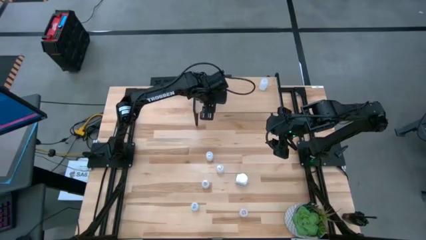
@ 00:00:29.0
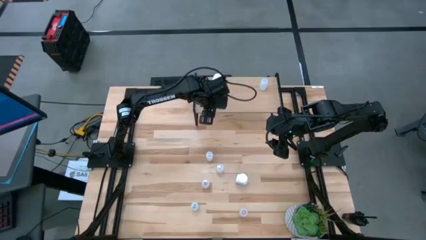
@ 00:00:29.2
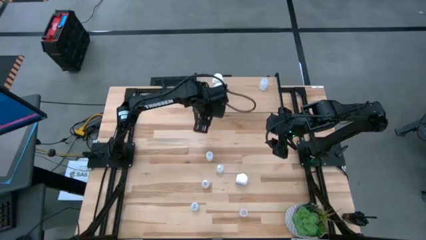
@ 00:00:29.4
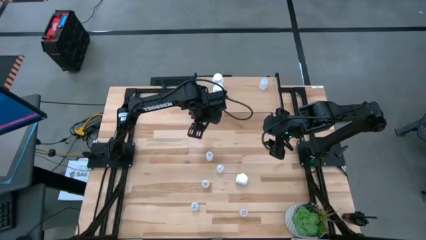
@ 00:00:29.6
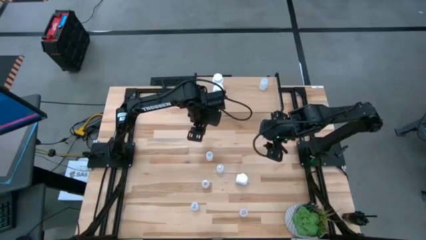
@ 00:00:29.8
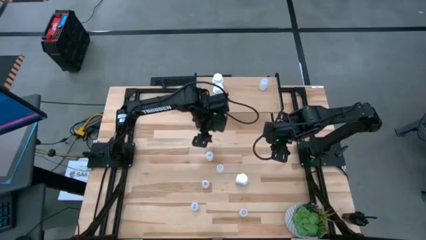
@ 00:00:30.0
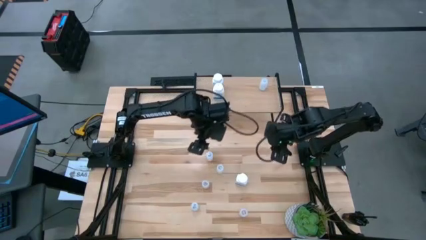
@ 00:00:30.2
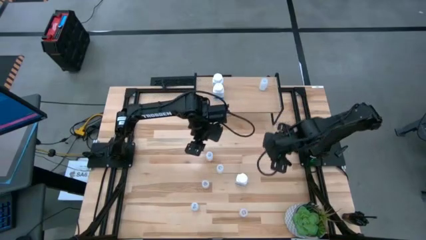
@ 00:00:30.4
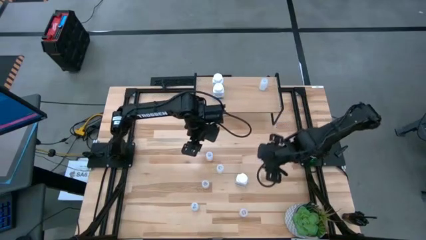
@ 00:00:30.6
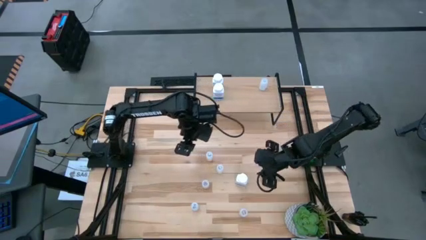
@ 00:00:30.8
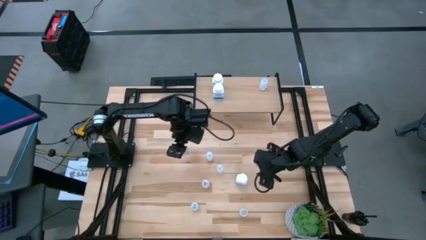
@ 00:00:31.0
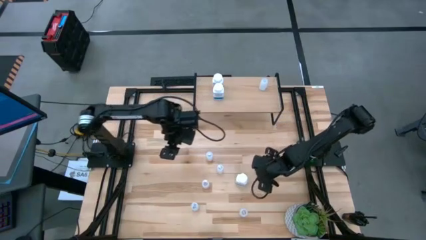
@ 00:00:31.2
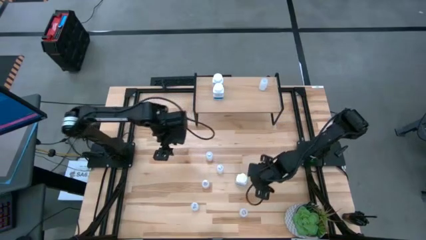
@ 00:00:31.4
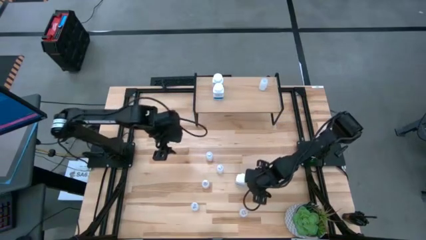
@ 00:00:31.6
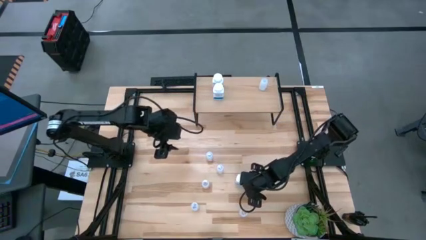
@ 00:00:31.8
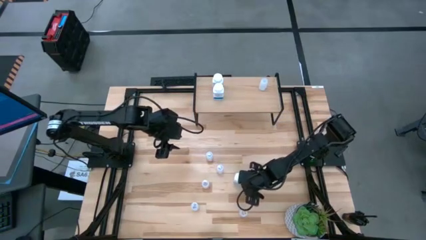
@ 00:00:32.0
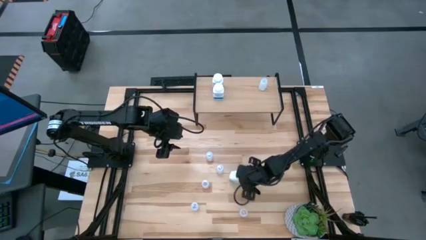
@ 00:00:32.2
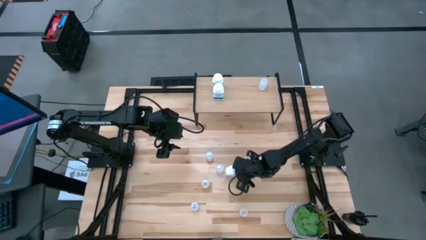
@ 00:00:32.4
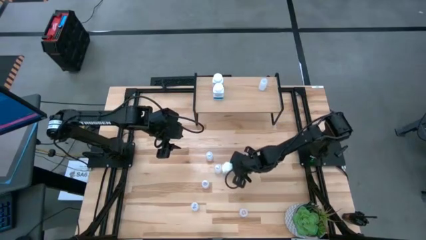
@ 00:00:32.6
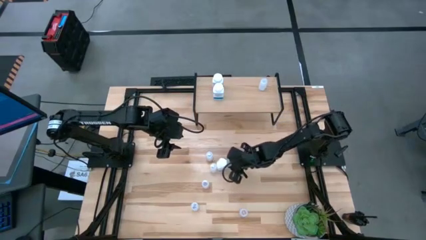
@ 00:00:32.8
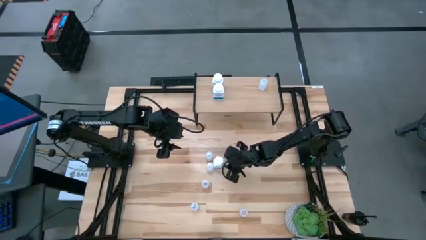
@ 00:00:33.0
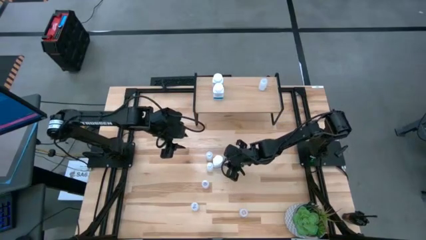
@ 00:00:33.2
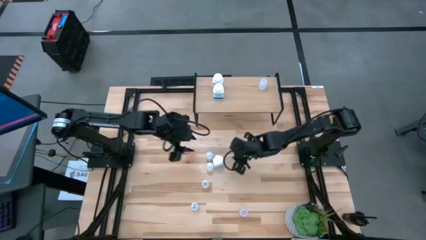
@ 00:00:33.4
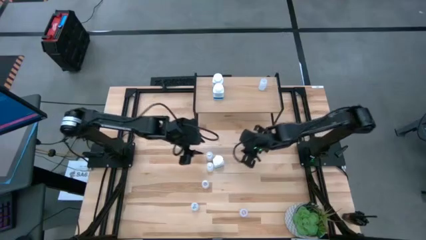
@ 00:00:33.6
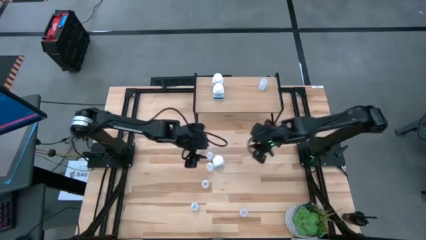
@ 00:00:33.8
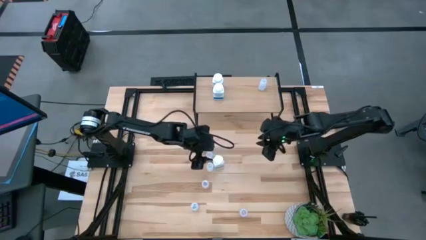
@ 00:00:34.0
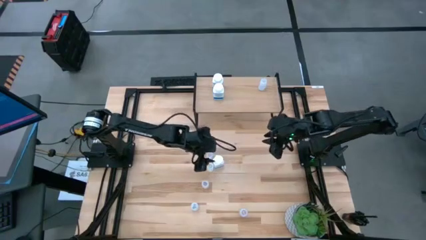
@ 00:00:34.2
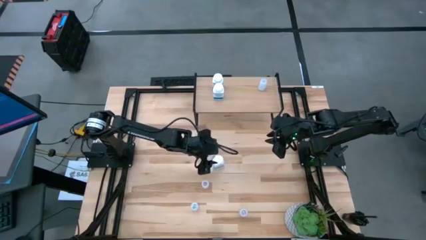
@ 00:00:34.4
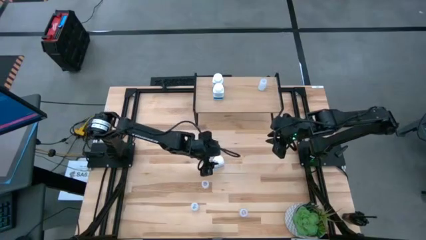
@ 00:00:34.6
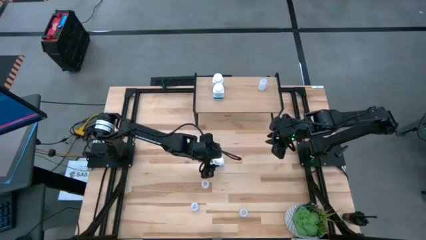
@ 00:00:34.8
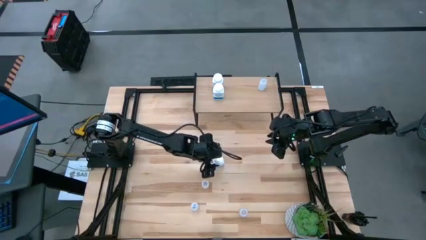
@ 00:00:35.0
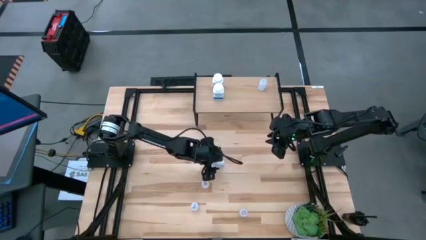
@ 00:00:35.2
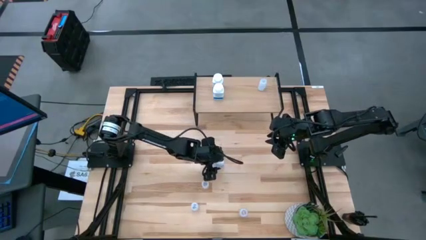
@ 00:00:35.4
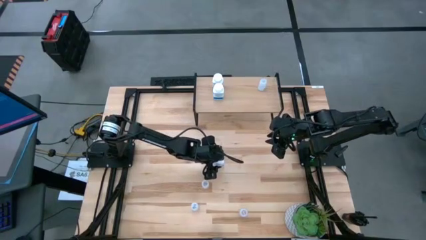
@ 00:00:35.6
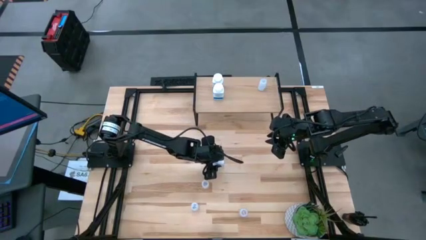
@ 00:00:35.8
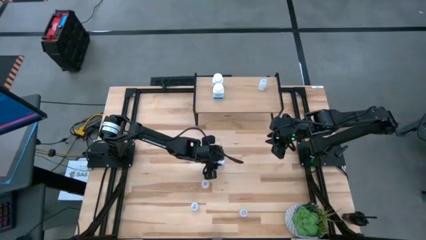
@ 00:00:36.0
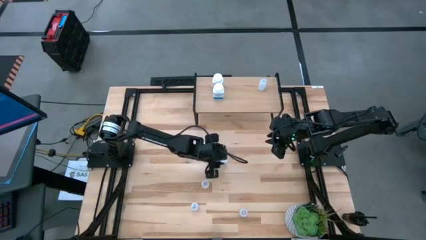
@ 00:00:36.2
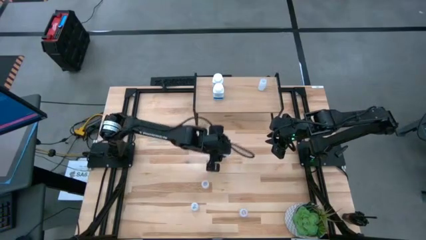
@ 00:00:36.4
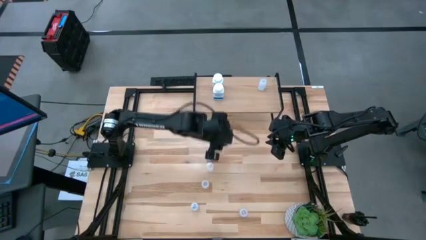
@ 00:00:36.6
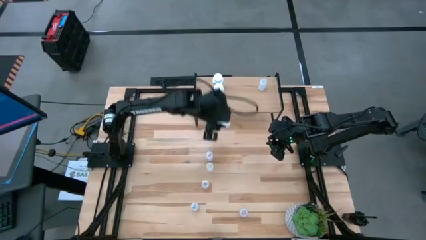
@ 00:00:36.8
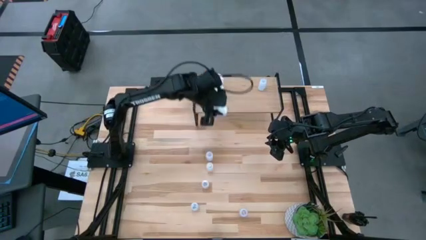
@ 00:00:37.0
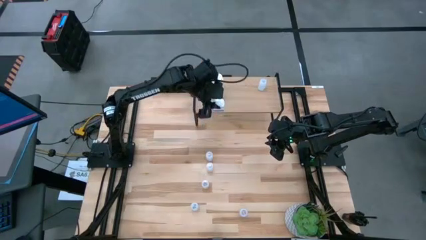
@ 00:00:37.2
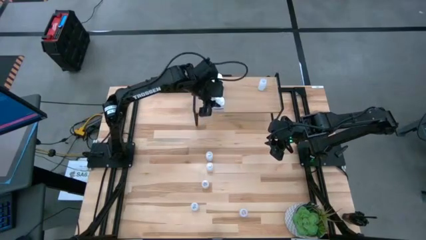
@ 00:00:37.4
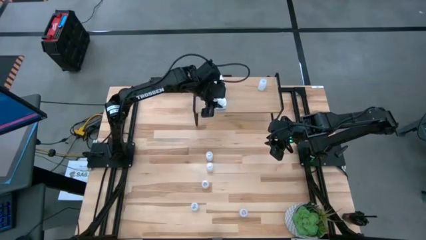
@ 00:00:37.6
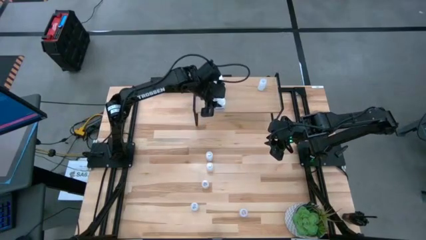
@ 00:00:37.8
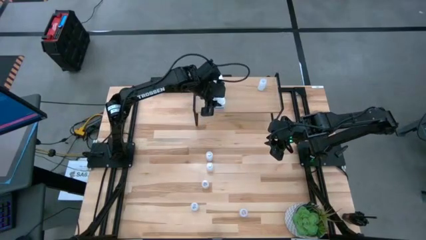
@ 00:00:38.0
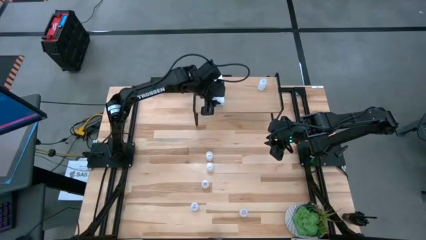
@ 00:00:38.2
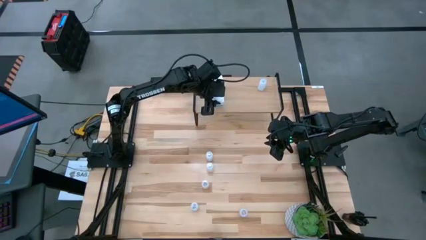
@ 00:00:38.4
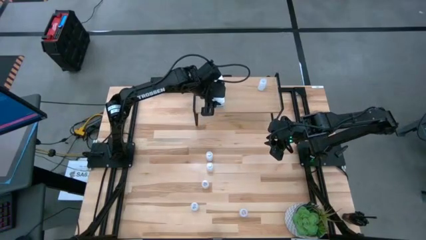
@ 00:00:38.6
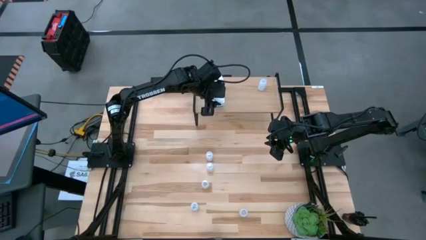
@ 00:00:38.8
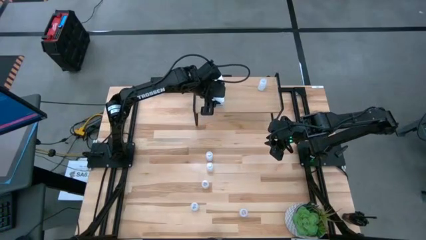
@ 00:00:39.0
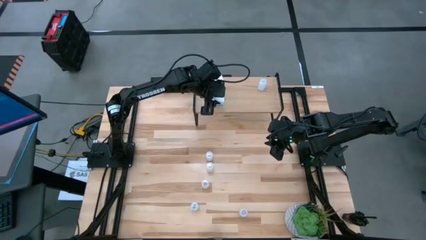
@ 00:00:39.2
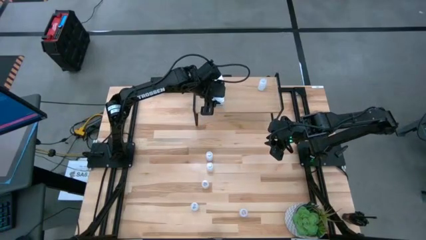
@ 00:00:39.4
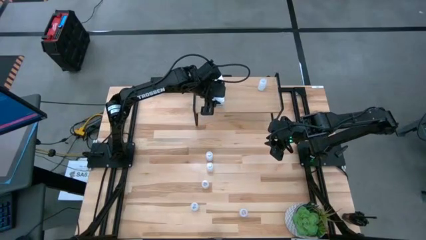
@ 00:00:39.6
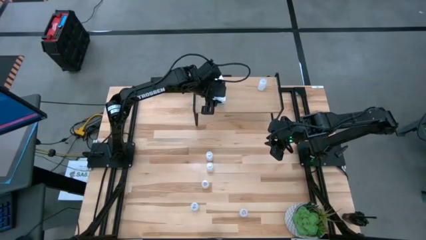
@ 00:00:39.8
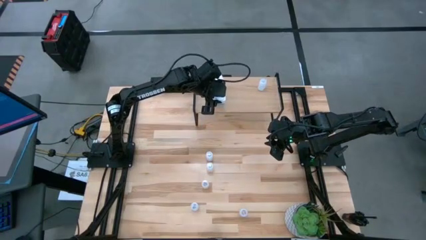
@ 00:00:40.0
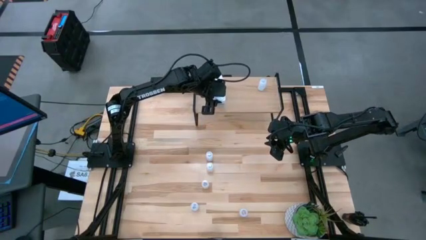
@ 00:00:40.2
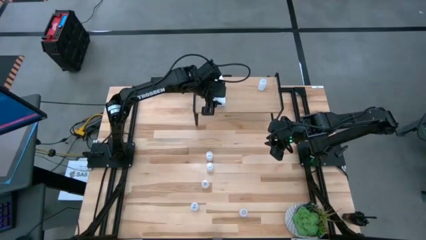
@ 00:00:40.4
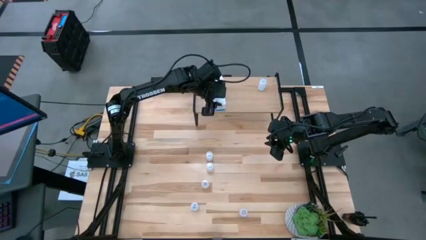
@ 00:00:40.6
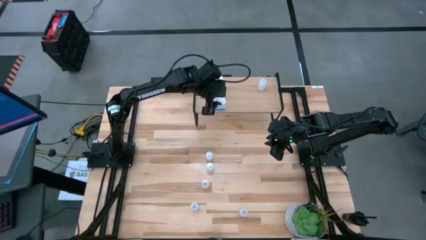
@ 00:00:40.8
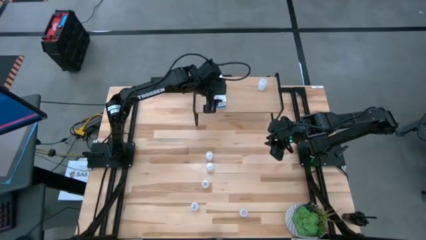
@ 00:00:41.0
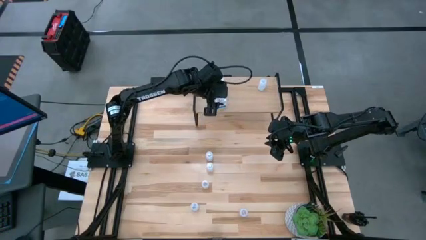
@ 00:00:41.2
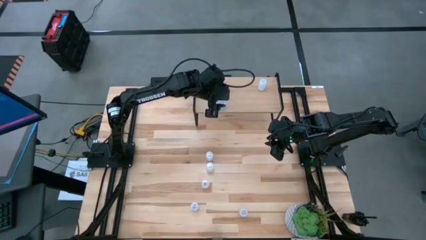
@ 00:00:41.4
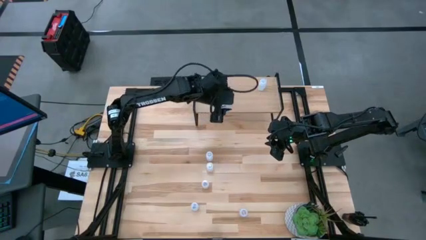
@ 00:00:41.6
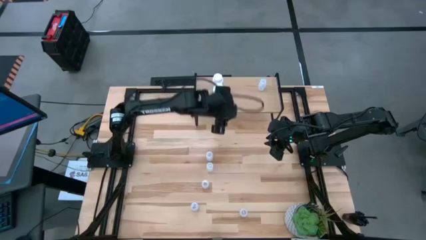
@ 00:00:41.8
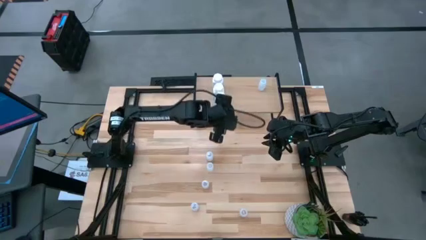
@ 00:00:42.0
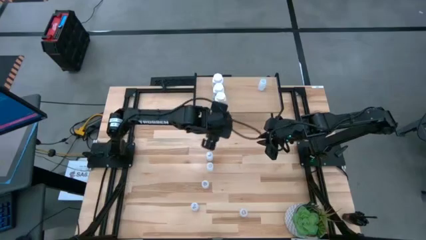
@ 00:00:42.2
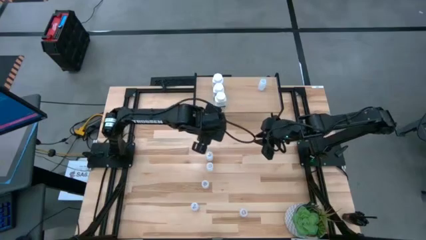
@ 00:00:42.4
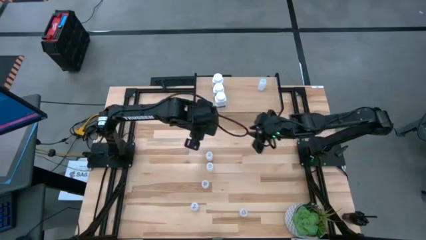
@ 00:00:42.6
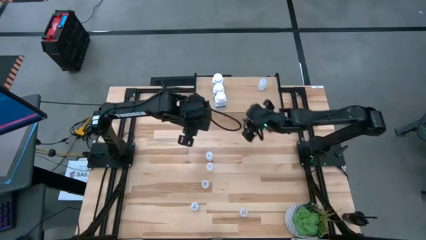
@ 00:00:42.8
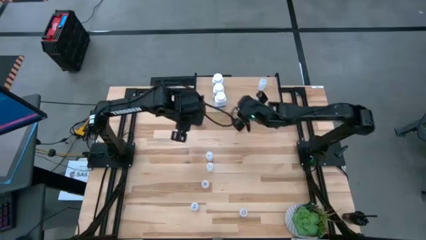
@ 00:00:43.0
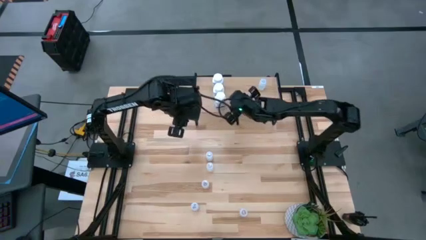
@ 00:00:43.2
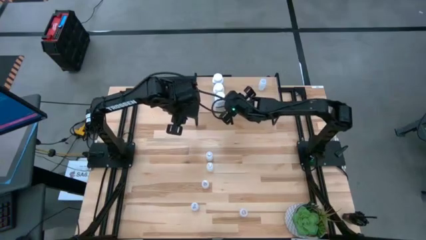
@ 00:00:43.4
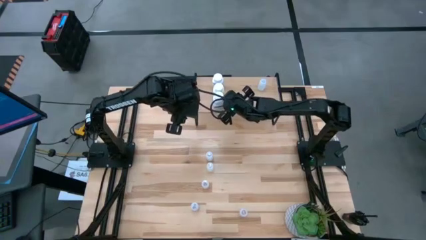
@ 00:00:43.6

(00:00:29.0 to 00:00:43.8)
Task: Pick and place medicine bottles onto shelf by color
Put the white medicine bottle on the shelf aligned with the other white medicine bottle
